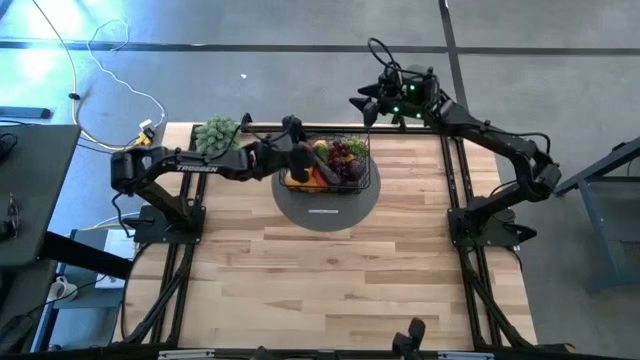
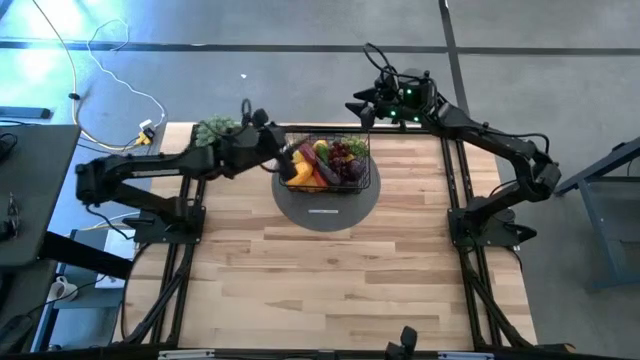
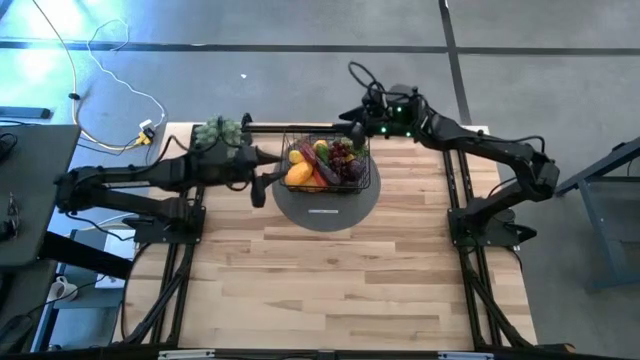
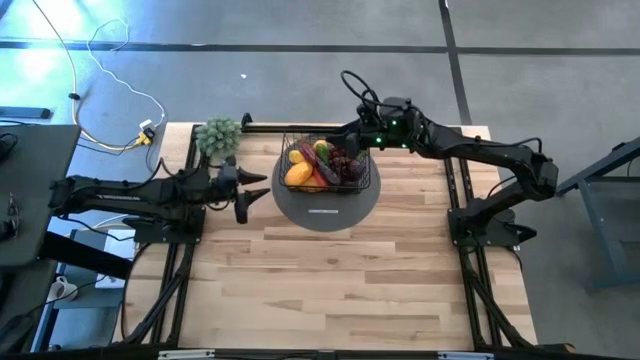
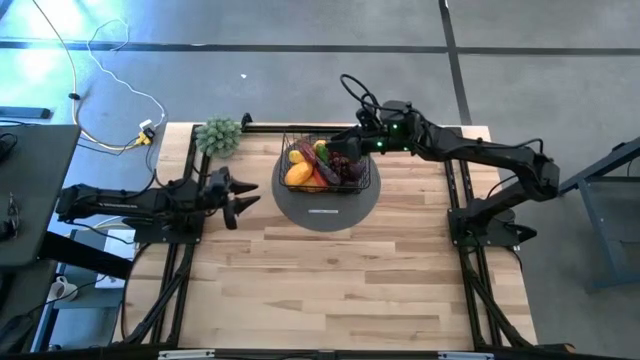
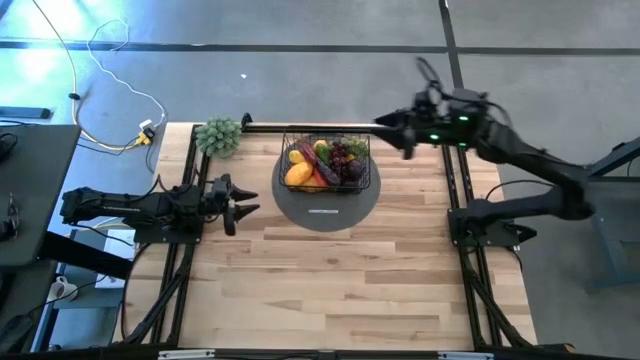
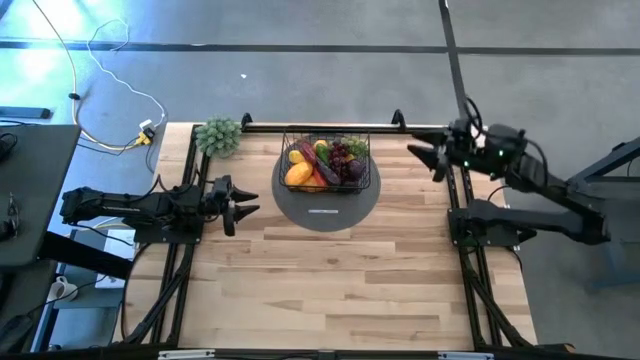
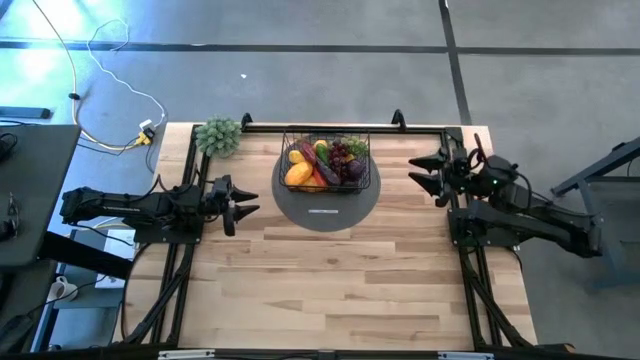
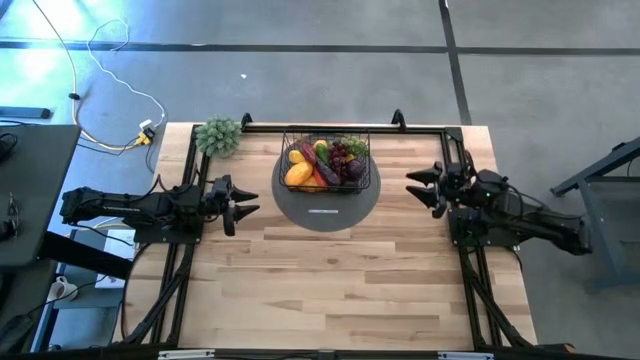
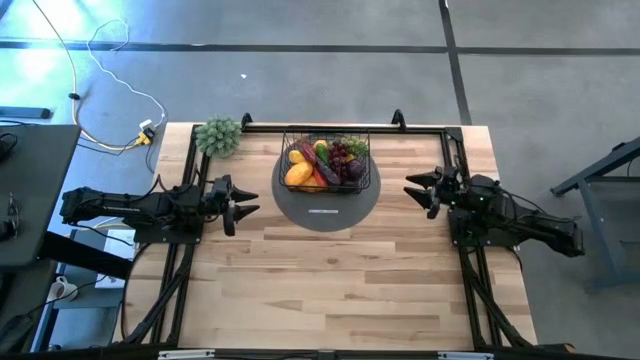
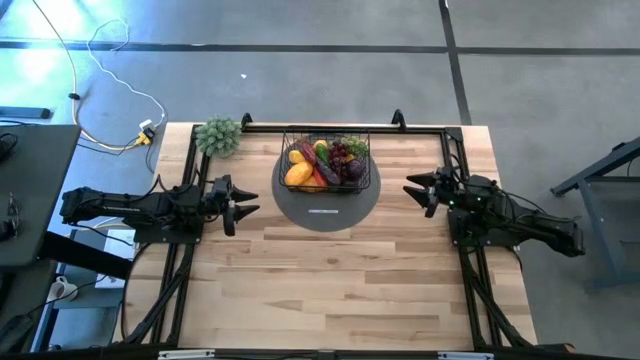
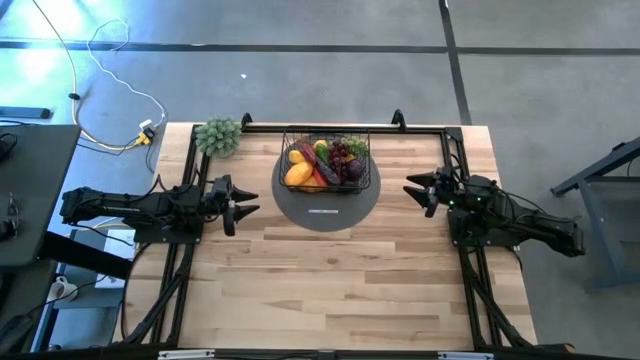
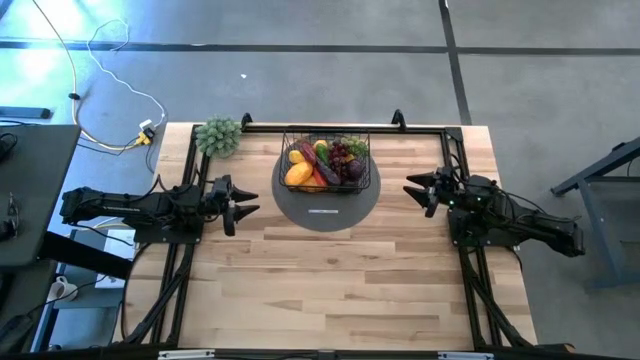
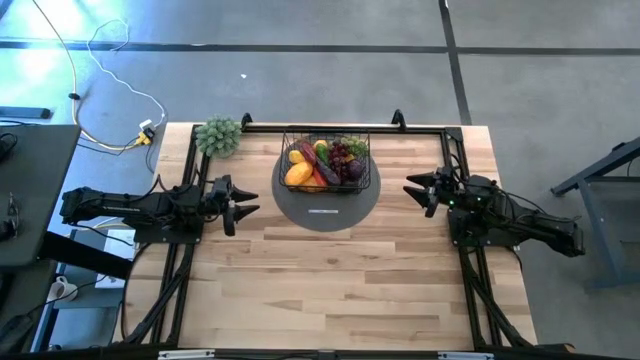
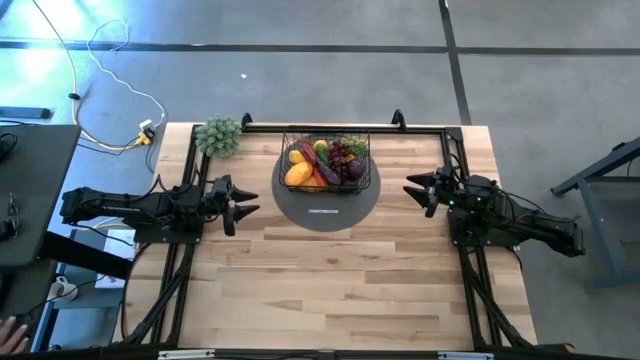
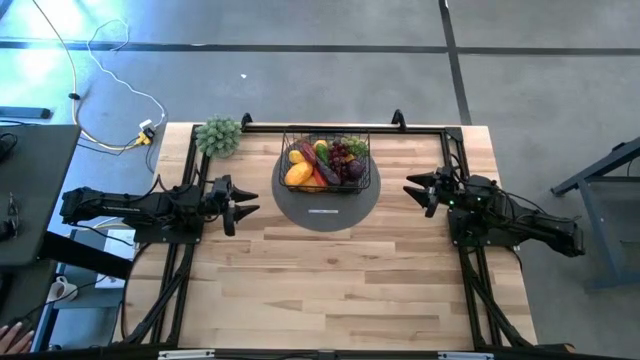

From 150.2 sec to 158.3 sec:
Task: Build produce basket
Return to Home Position

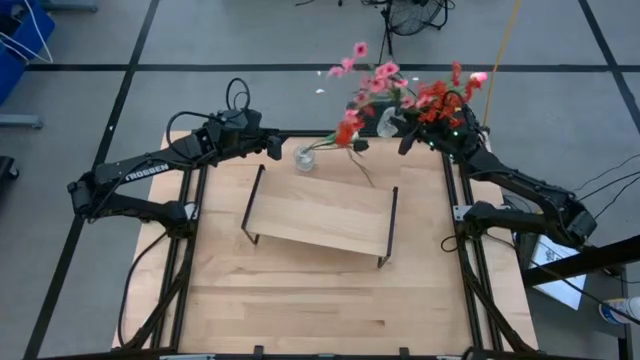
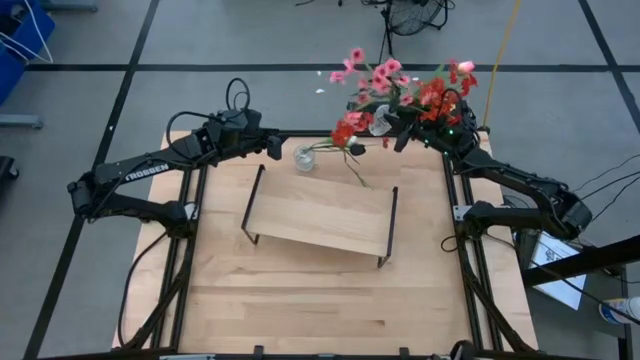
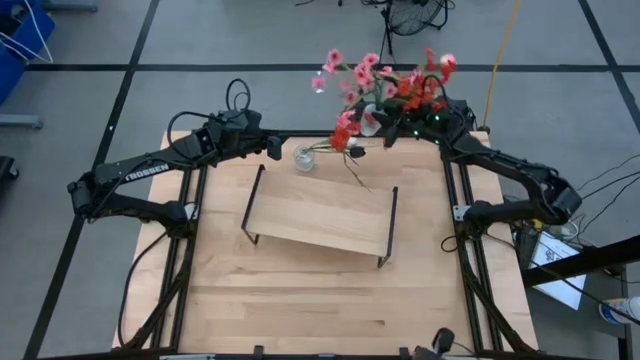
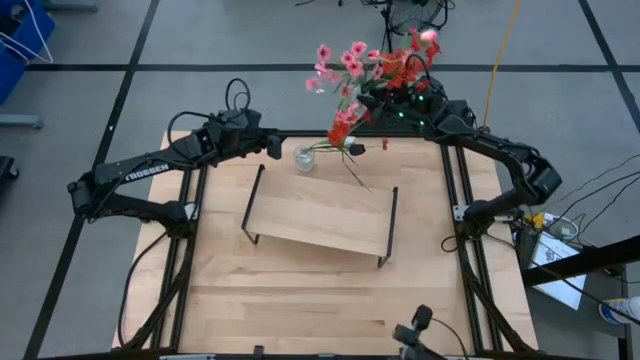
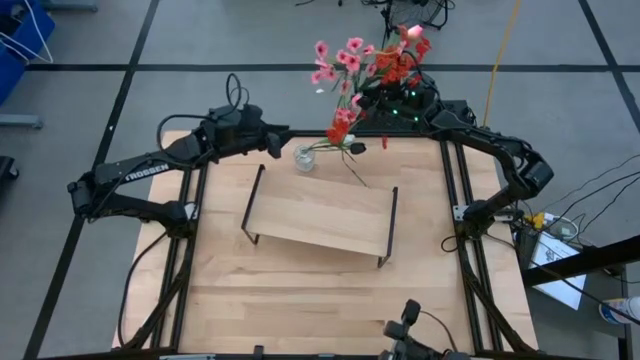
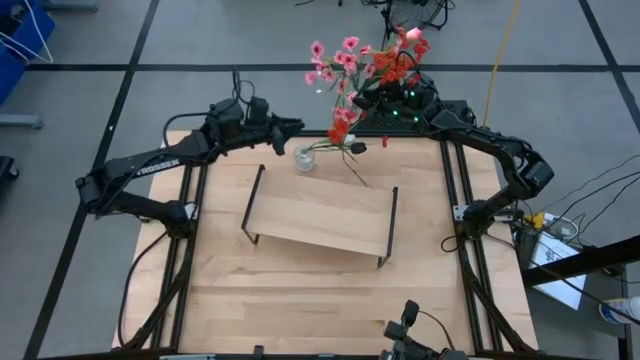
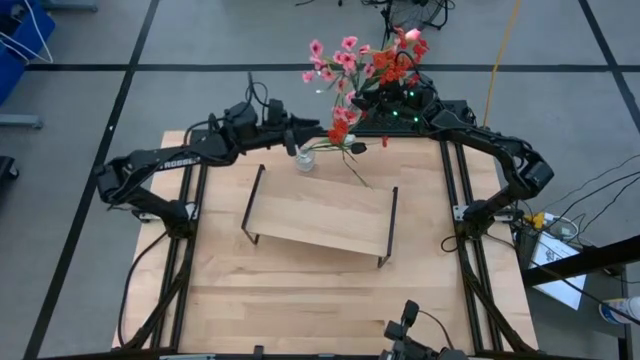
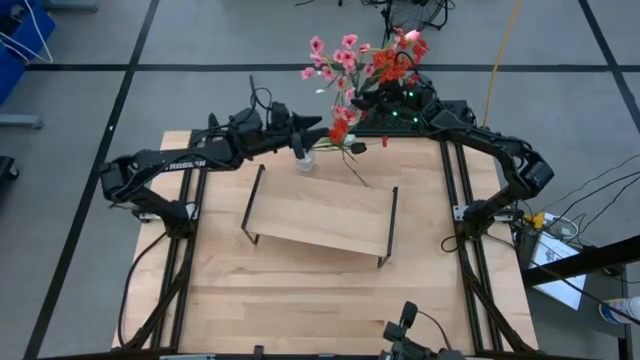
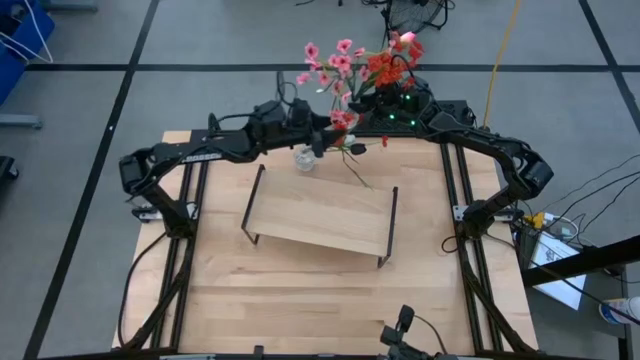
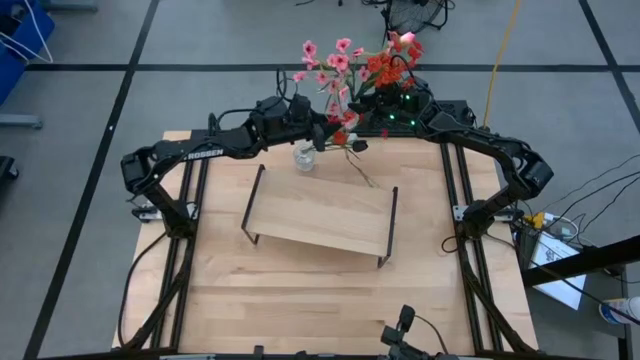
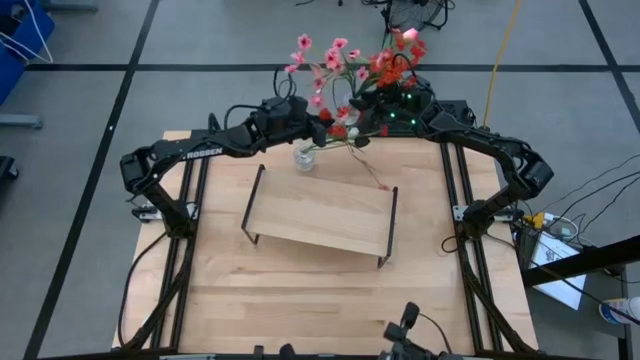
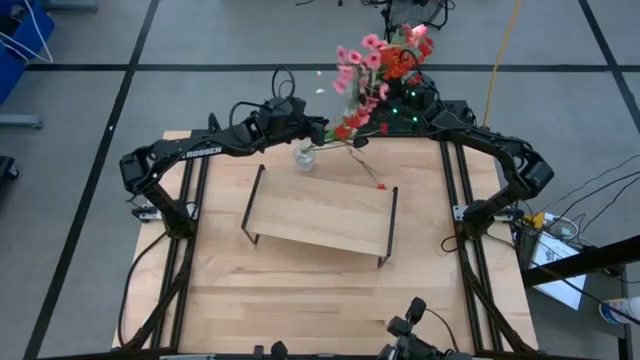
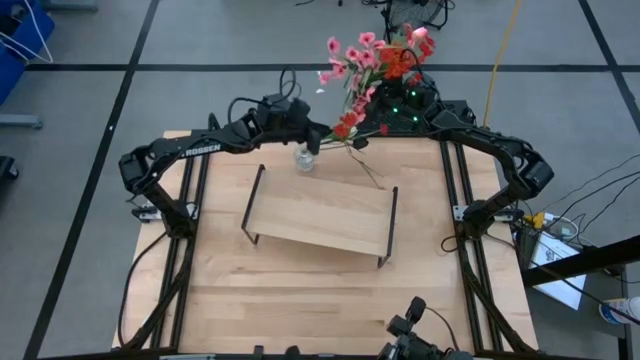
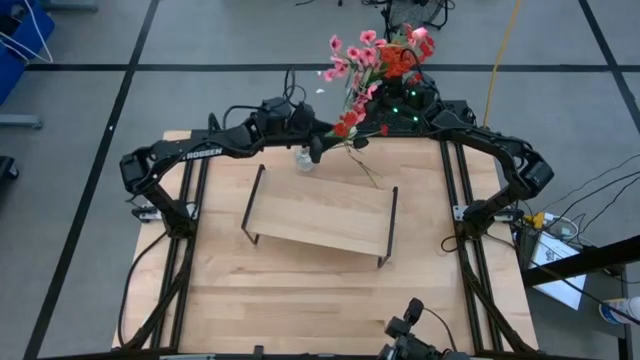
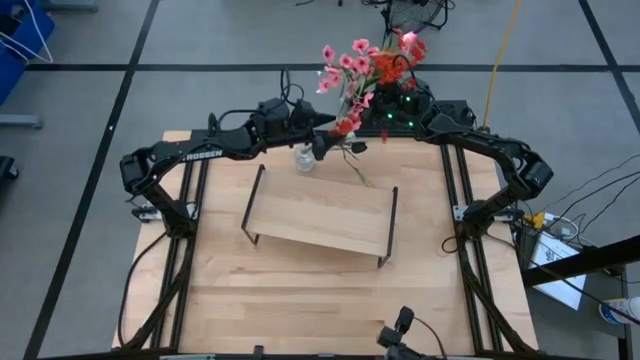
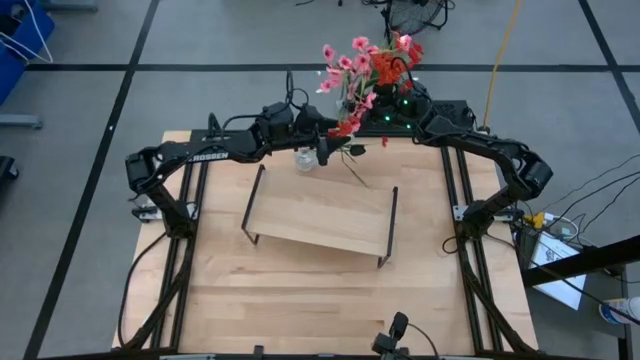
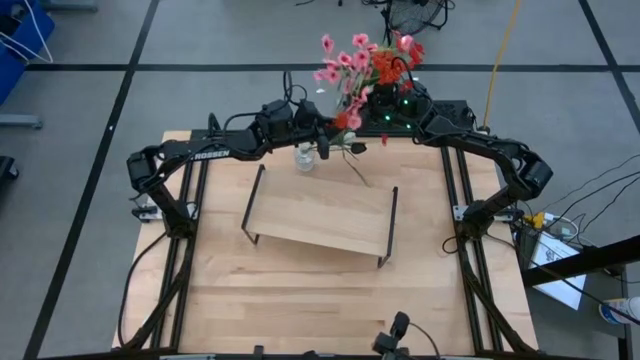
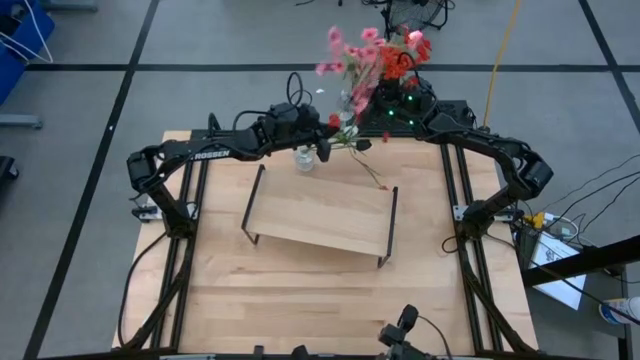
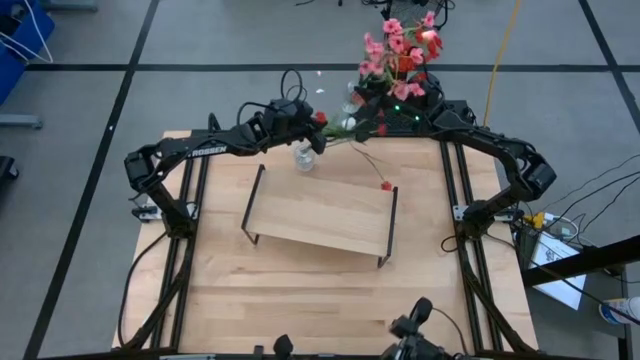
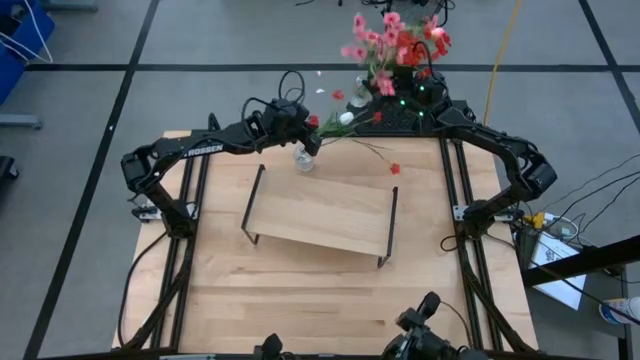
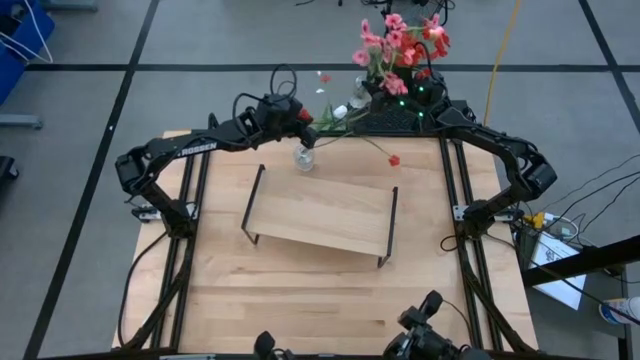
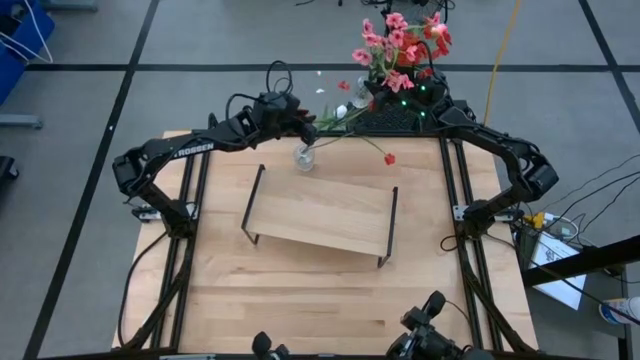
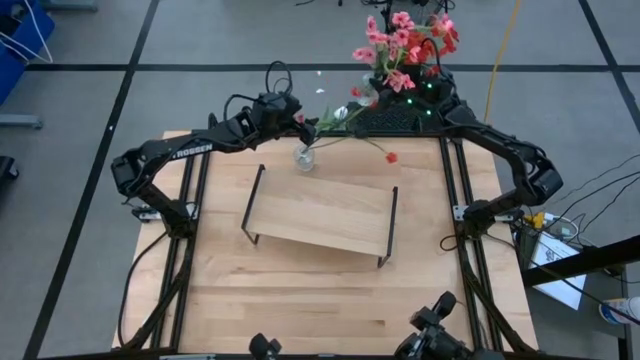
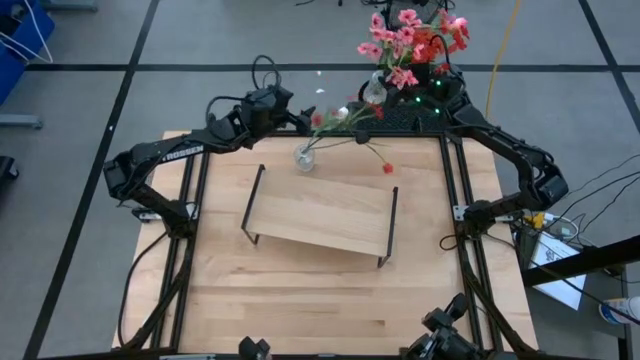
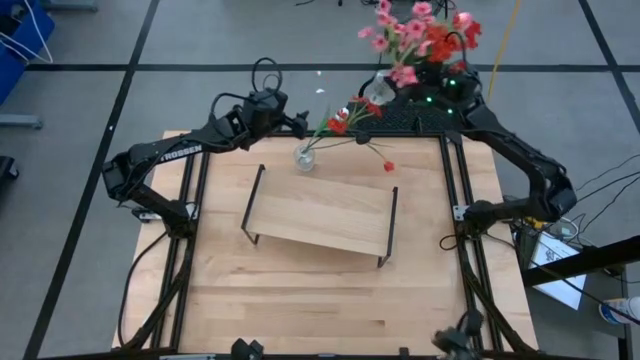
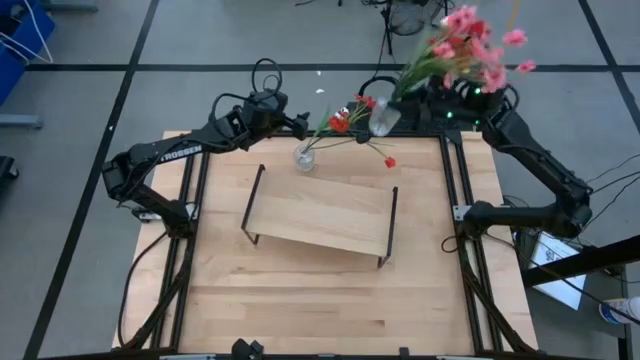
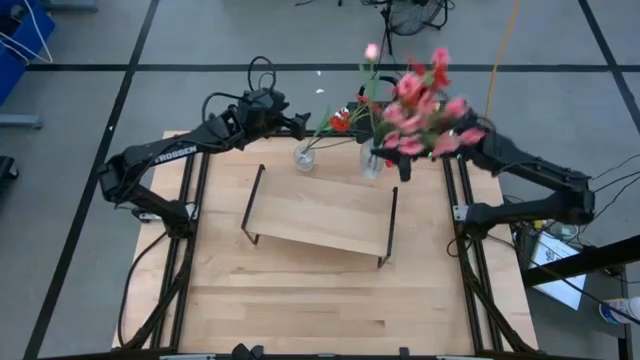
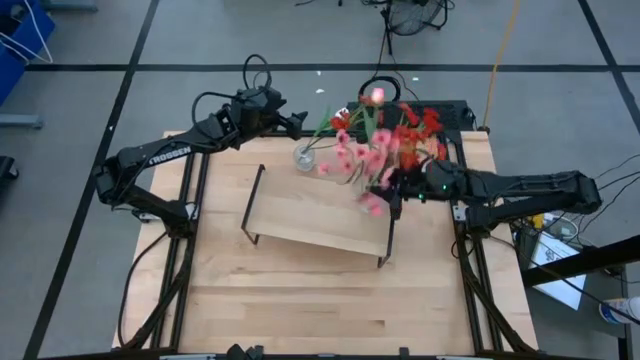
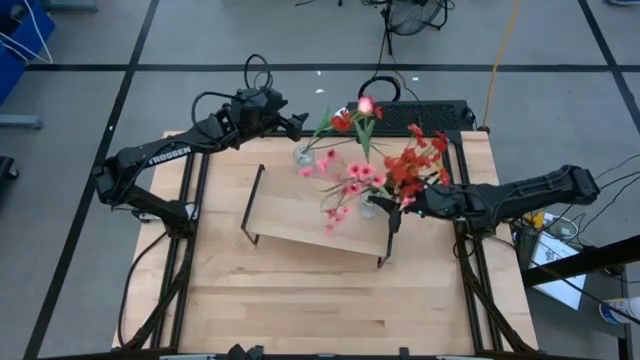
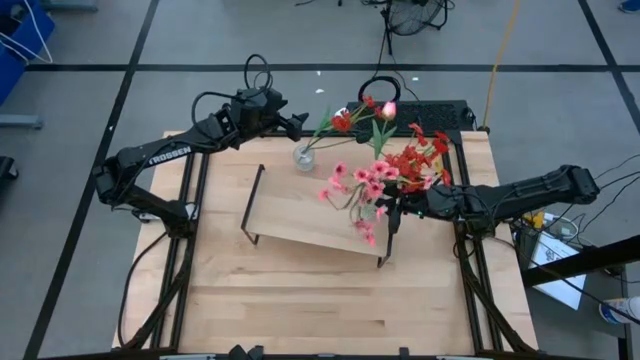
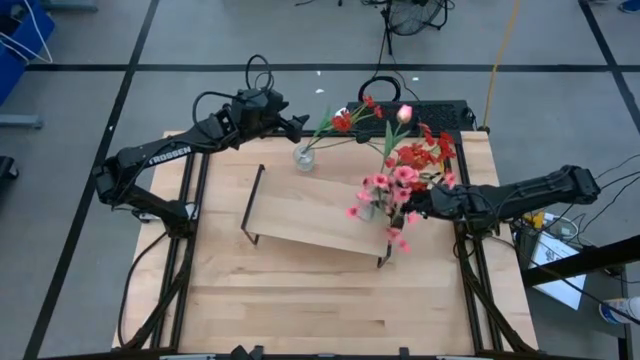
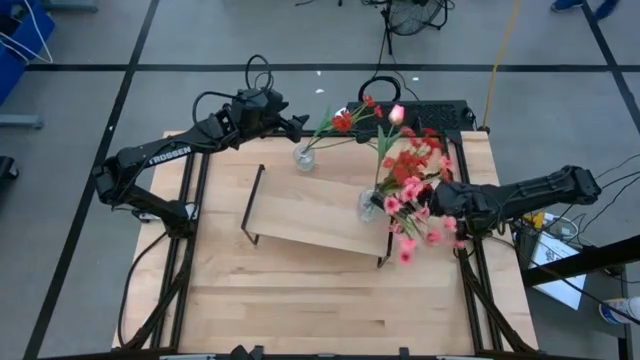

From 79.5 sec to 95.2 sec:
Task: Pick and place flowers into a vace then onto a shelf
Put the right transparent flower vase on the shelf
